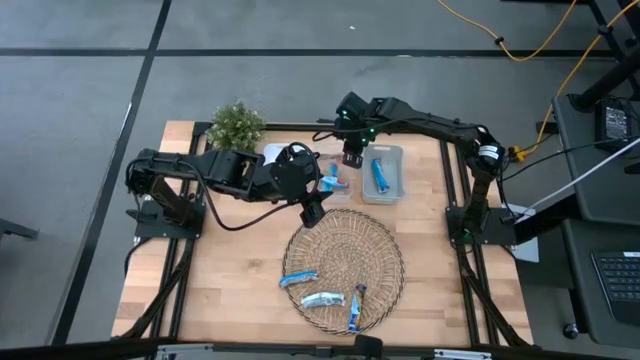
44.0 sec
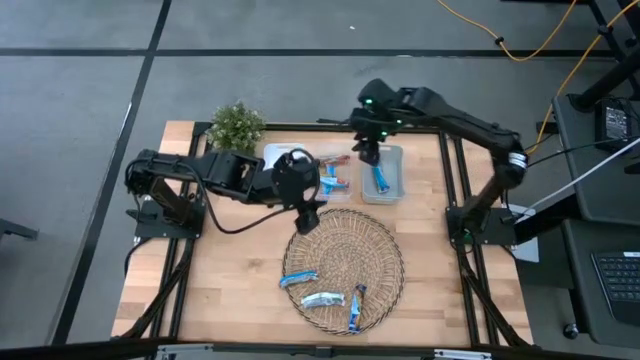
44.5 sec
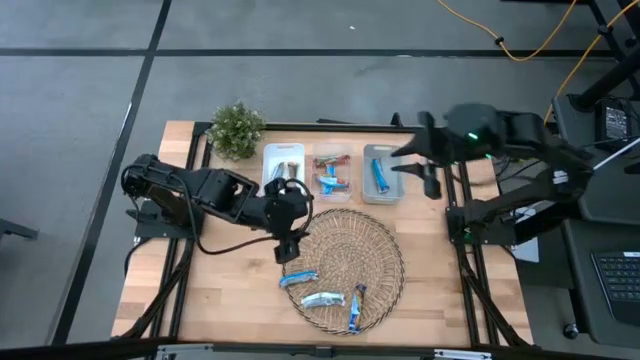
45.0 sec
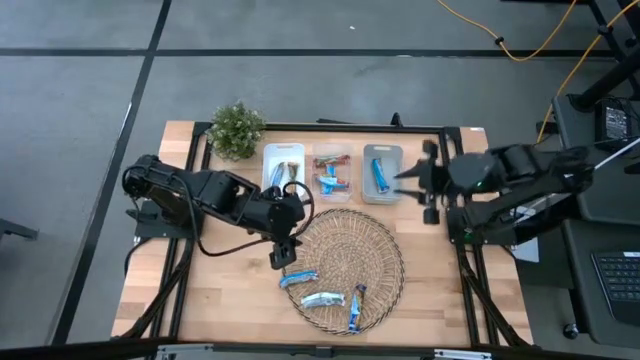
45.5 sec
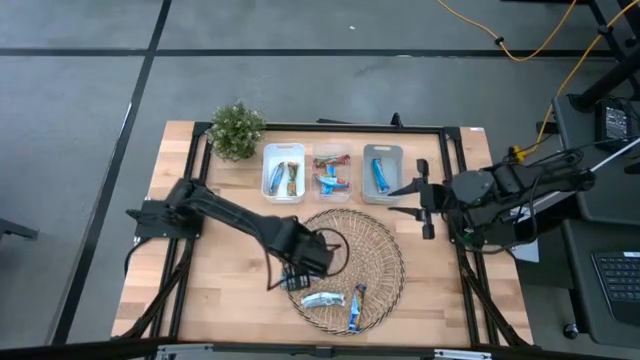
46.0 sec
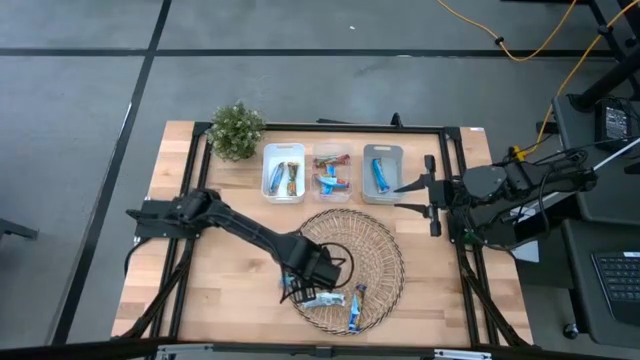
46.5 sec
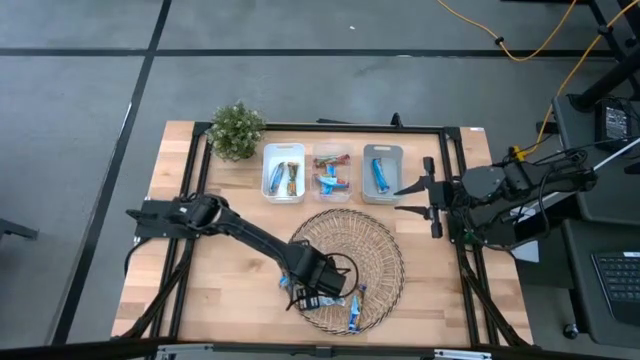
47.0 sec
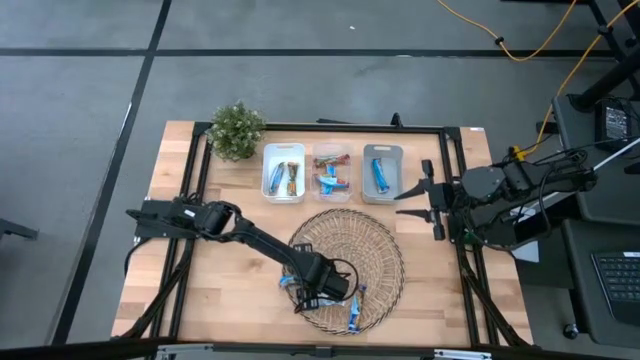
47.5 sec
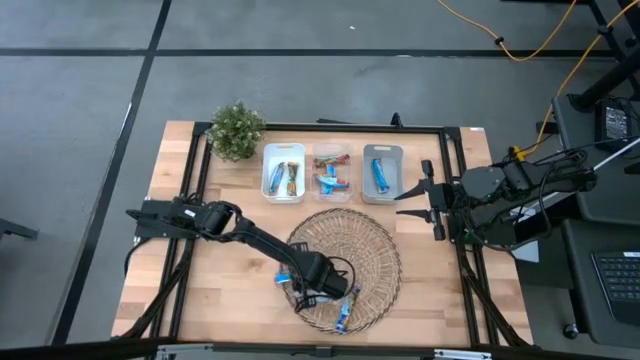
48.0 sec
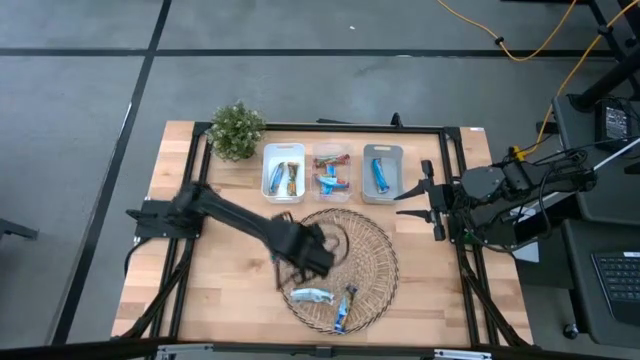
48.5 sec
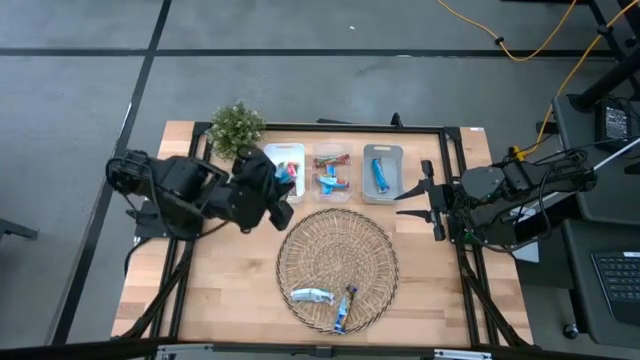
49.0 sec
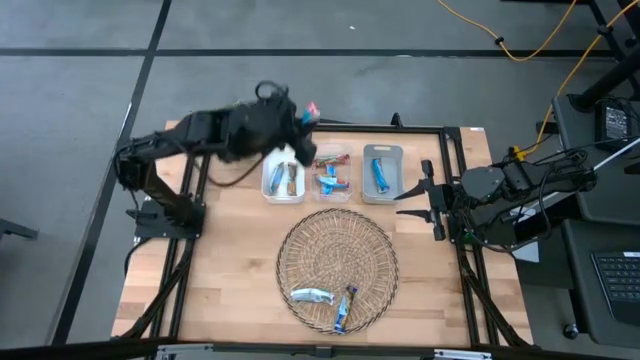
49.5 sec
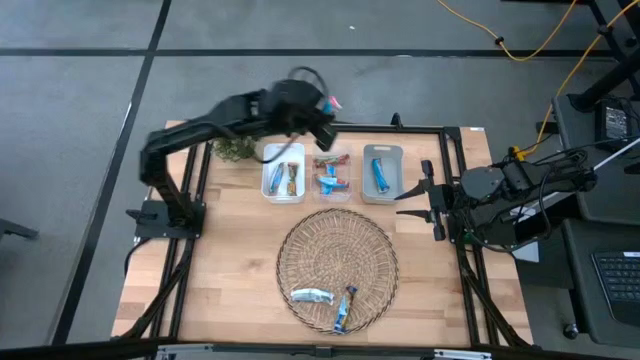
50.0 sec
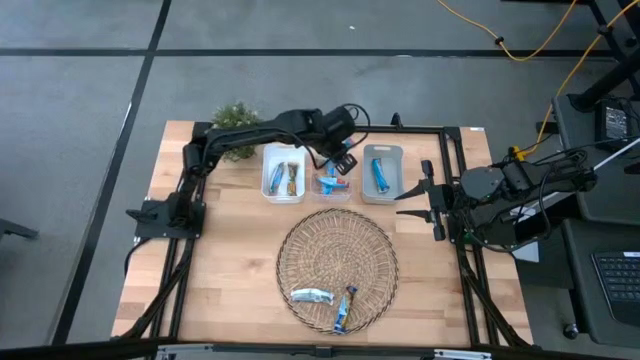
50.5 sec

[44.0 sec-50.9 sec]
Task: Pick and place Granola Bars by type
Put the red granola bar into the transparent bin

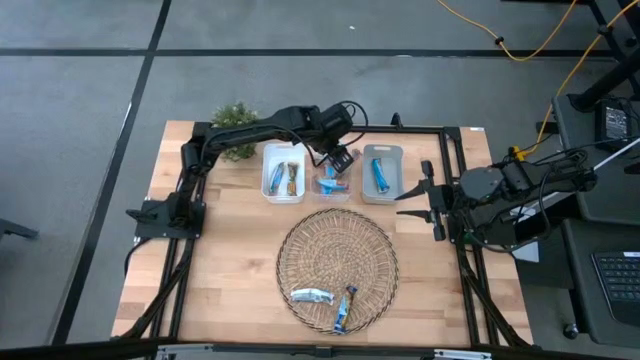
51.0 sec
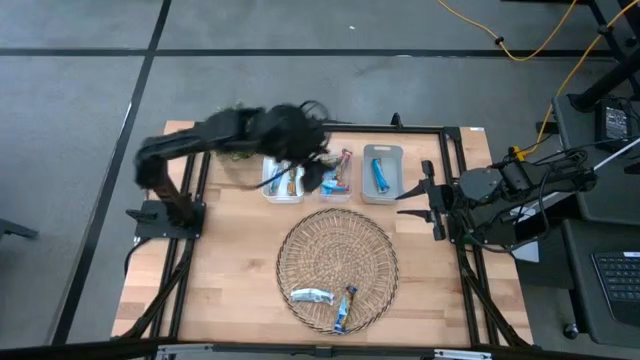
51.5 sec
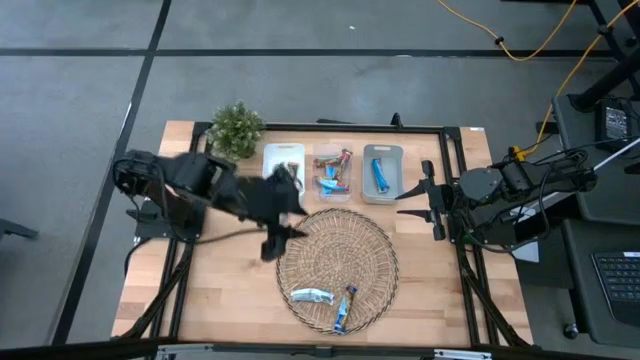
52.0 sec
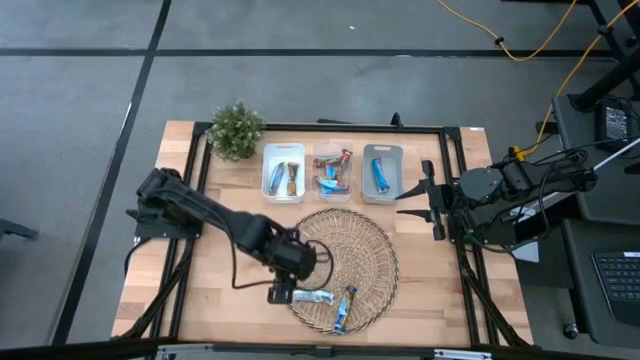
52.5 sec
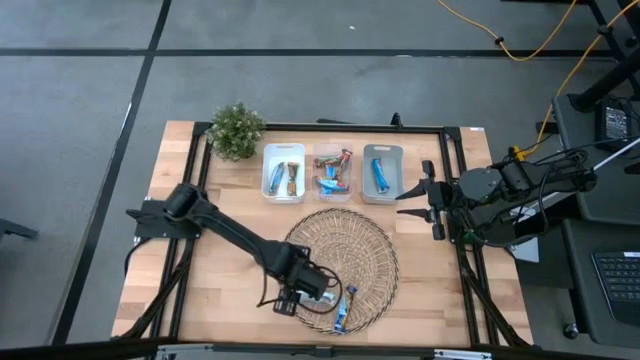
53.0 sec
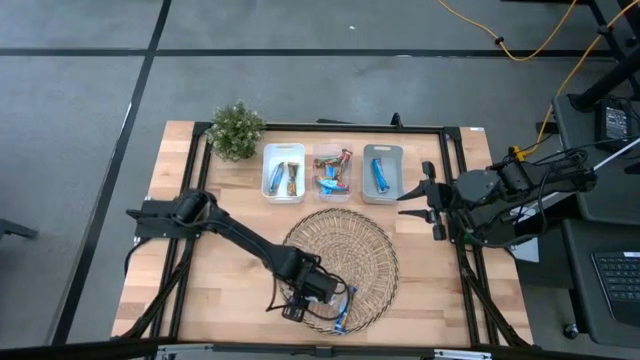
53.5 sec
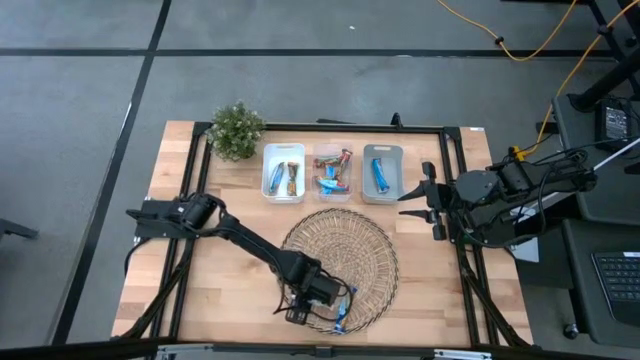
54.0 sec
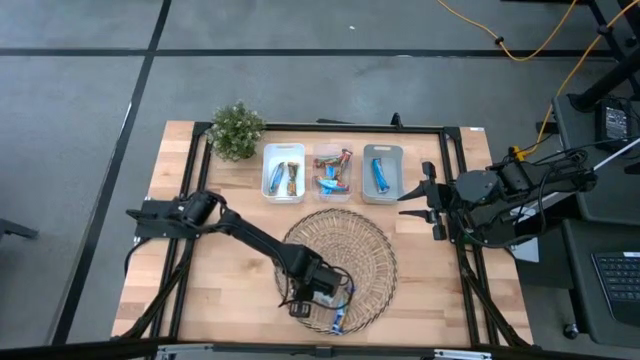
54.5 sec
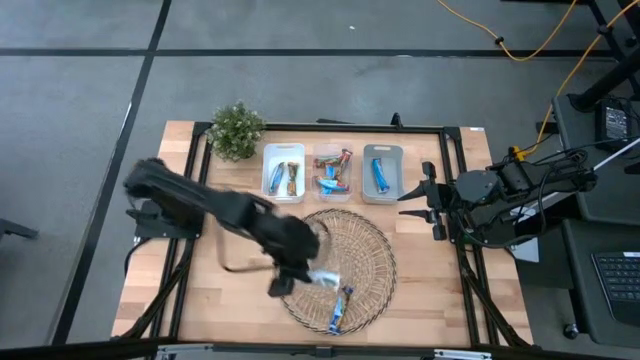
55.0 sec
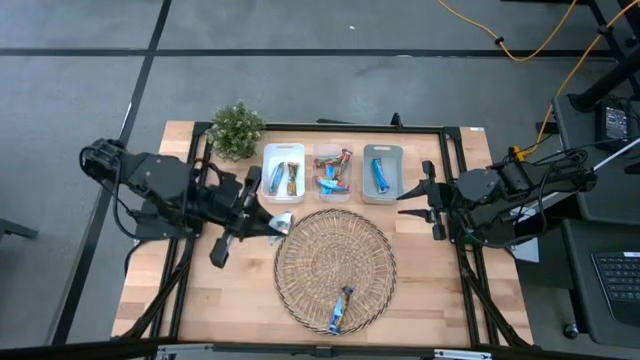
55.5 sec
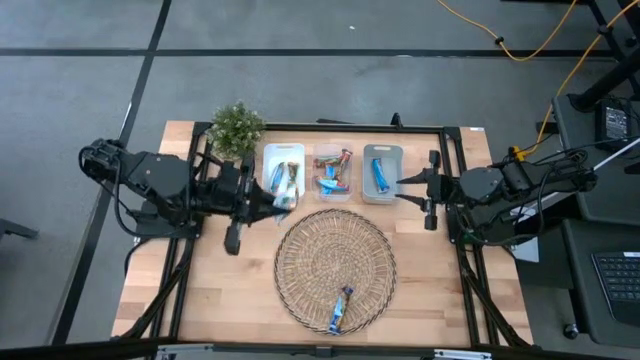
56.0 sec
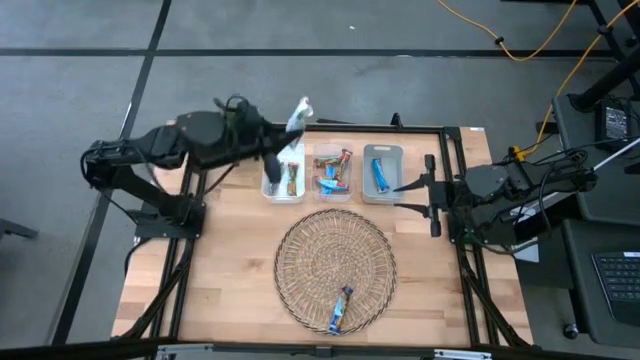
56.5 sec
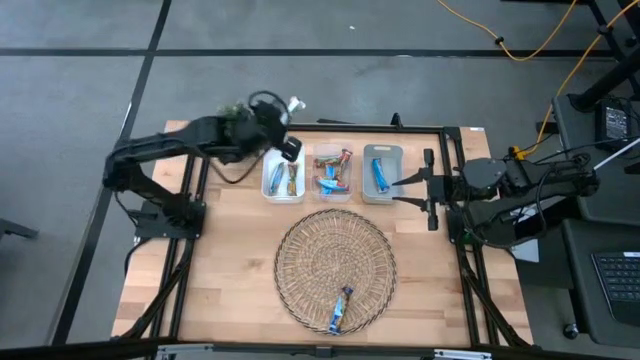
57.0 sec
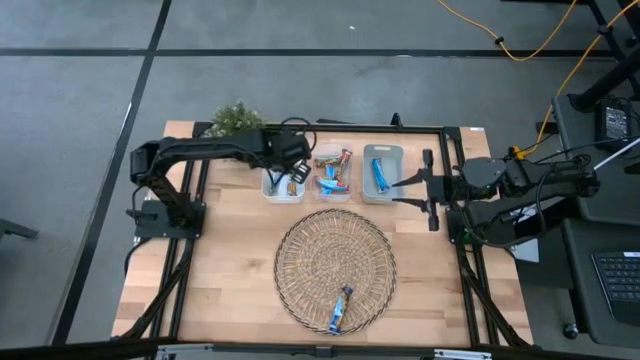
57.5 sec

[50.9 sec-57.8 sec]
Put the yellow granola bar into the white bin

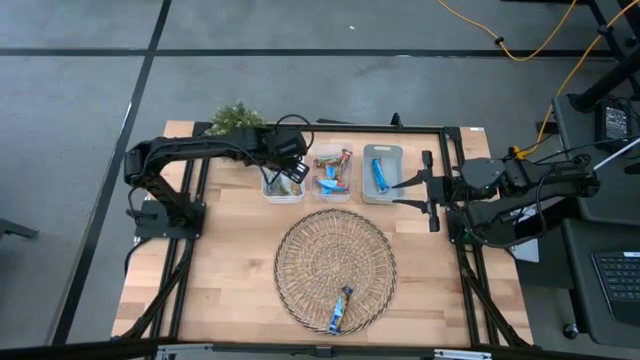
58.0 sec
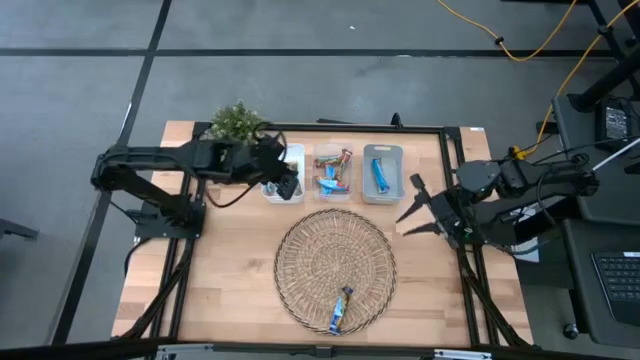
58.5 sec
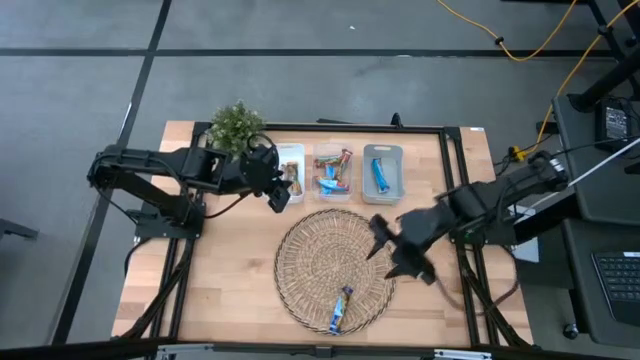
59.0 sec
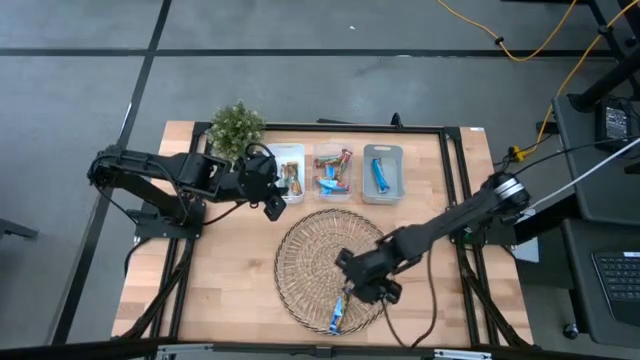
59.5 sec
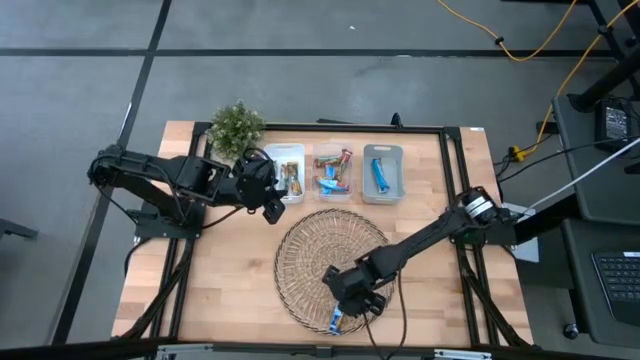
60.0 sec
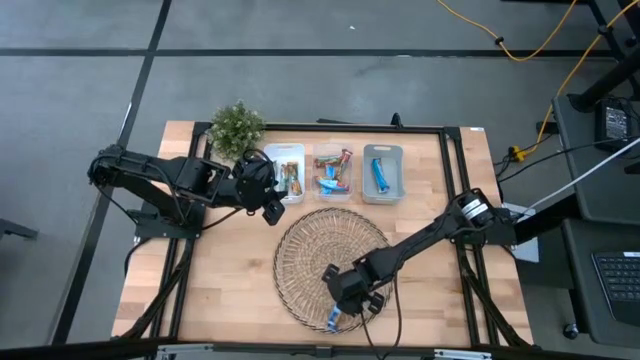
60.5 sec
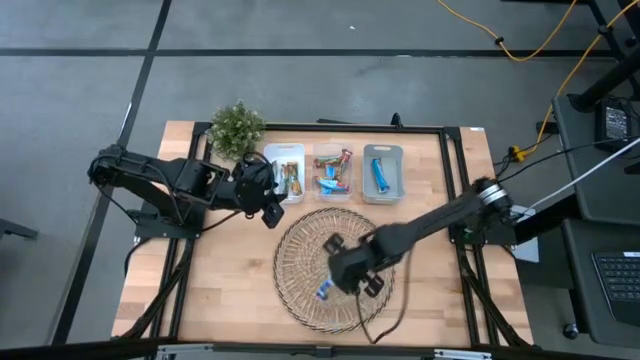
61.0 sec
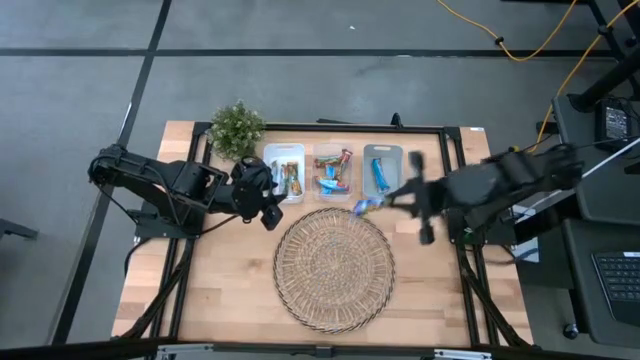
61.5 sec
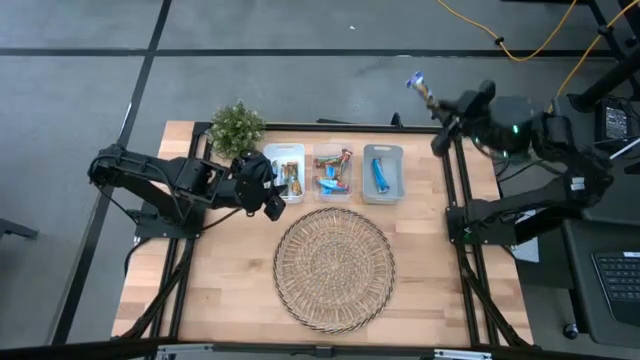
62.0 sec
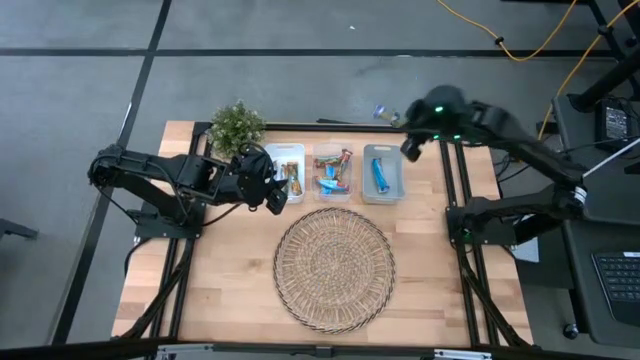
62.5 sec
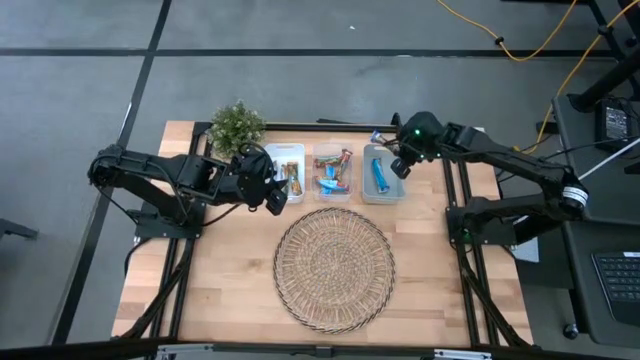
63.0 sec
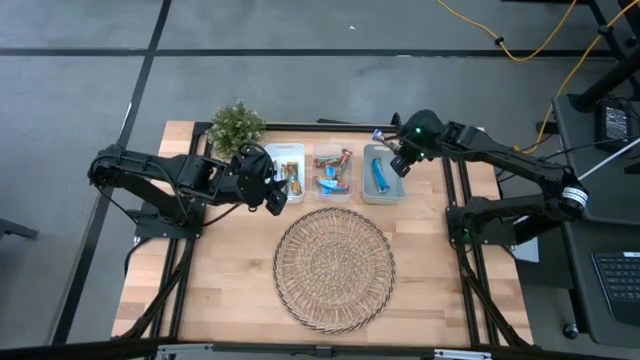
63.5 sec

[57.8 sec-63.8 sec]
Put the blue granola bar into the gray bin

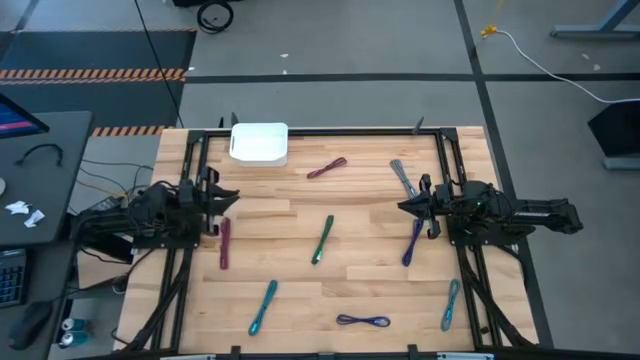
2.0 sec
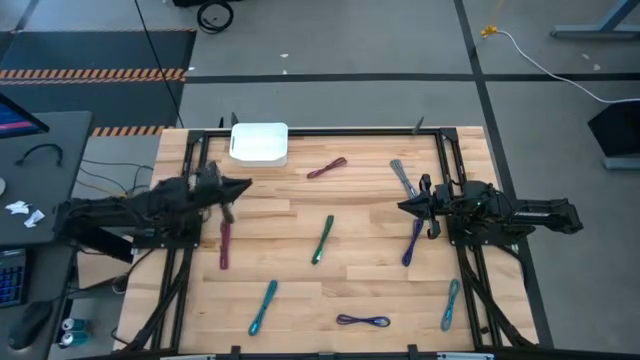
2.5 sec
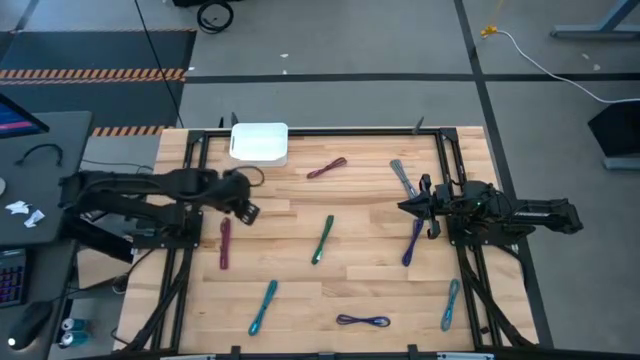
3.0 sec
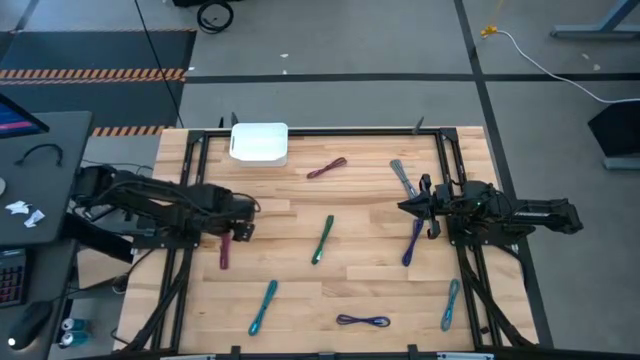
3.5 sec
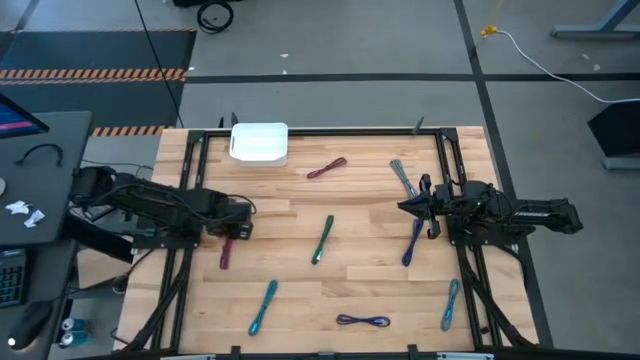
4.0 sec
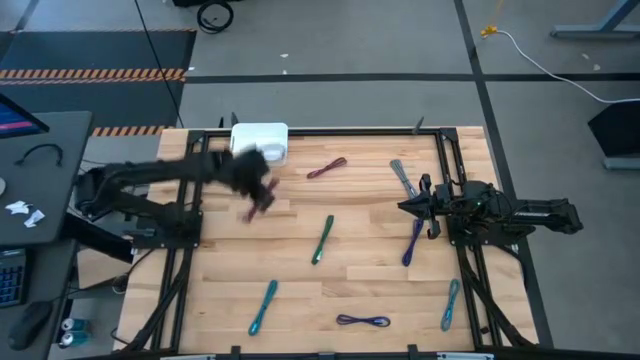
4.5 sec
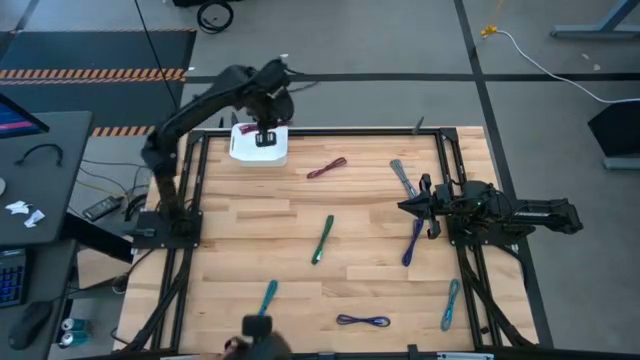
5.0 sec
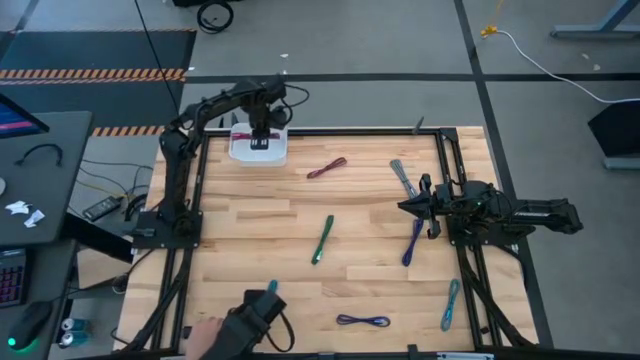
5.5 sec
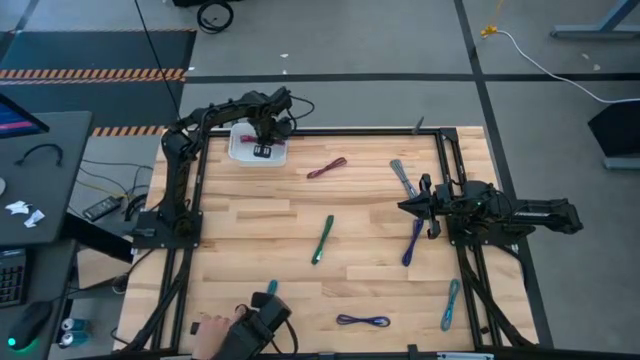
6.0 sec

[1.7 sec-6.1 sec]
Task: Pick and place USB-C Cables
Put the bottom pink USB cable into the white bin
